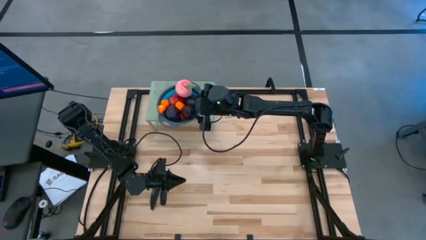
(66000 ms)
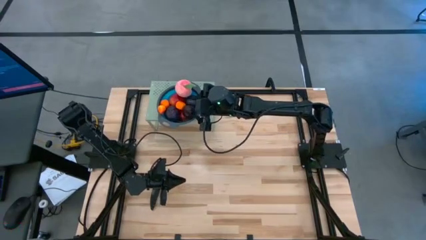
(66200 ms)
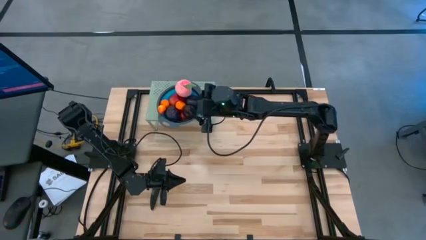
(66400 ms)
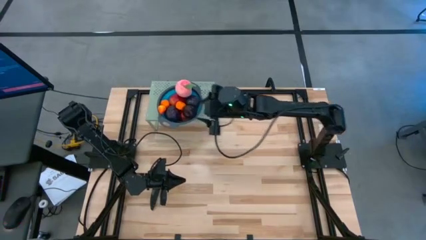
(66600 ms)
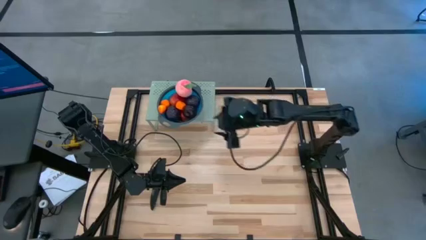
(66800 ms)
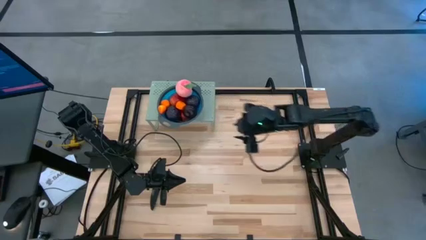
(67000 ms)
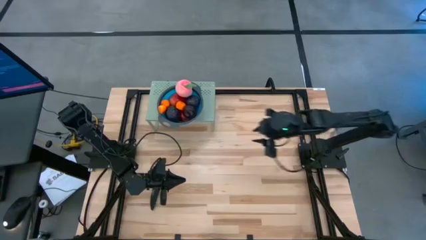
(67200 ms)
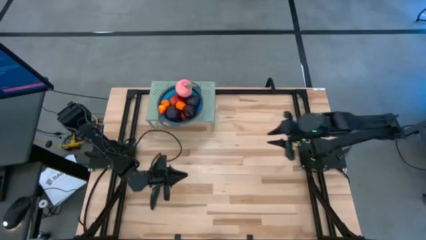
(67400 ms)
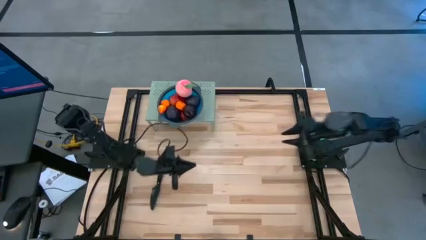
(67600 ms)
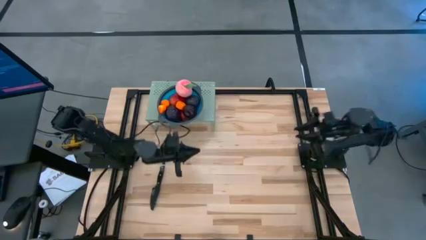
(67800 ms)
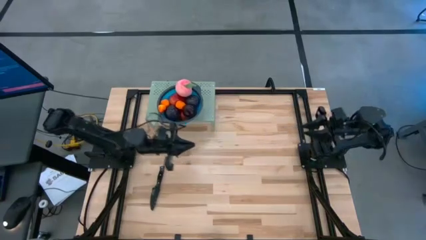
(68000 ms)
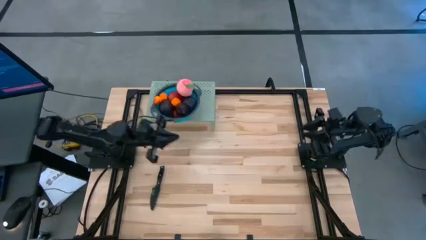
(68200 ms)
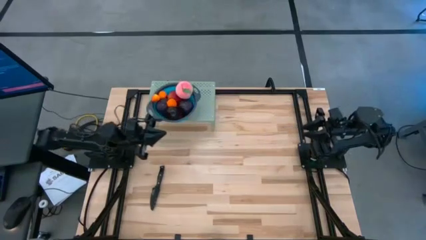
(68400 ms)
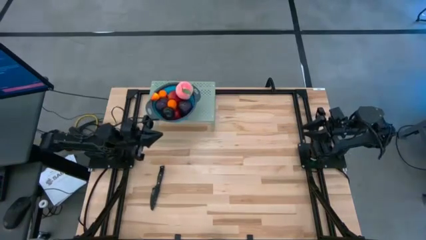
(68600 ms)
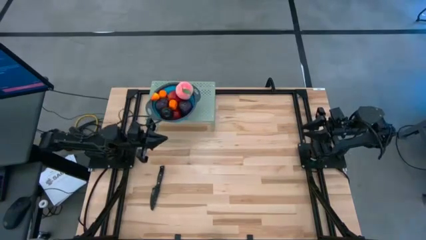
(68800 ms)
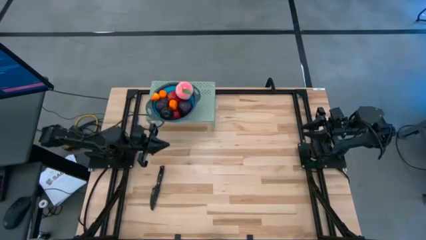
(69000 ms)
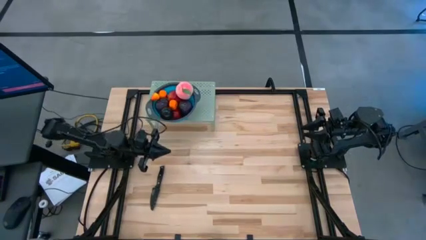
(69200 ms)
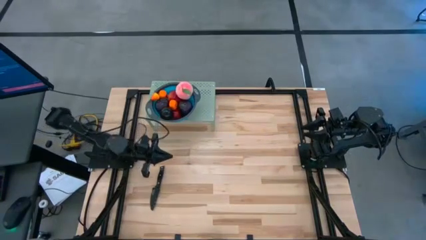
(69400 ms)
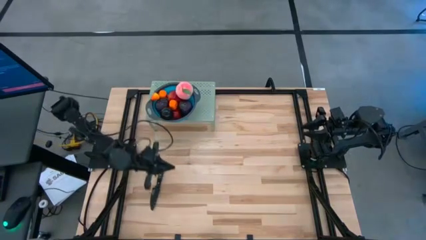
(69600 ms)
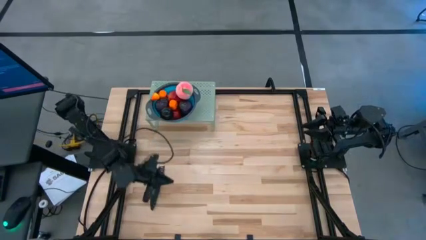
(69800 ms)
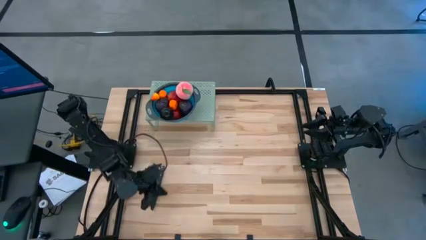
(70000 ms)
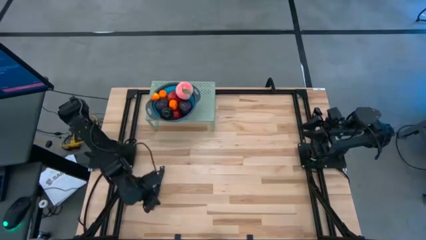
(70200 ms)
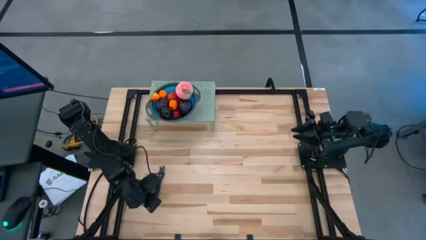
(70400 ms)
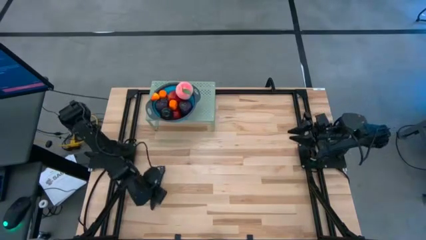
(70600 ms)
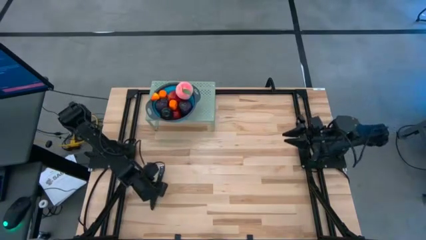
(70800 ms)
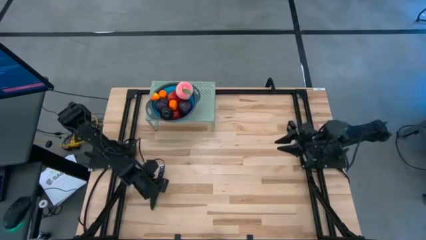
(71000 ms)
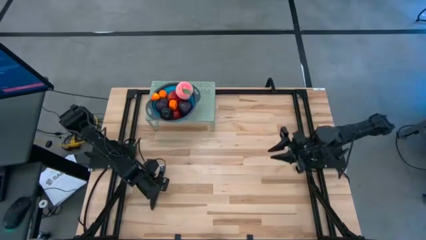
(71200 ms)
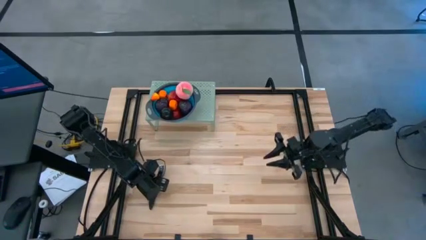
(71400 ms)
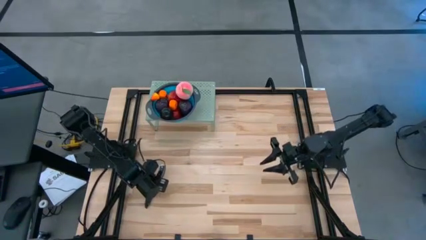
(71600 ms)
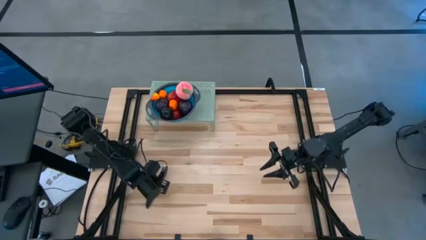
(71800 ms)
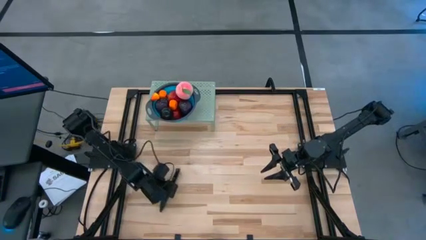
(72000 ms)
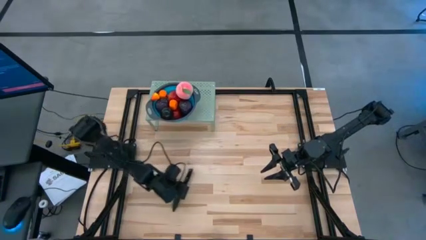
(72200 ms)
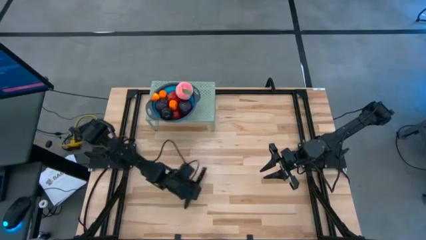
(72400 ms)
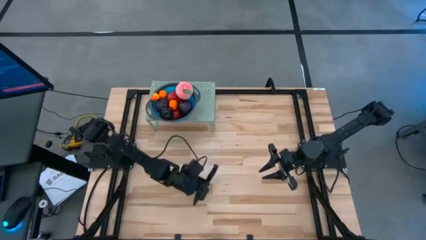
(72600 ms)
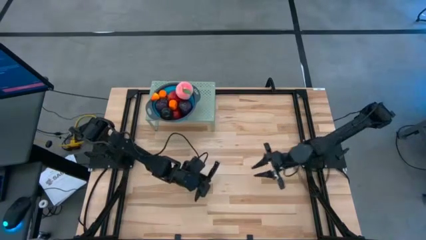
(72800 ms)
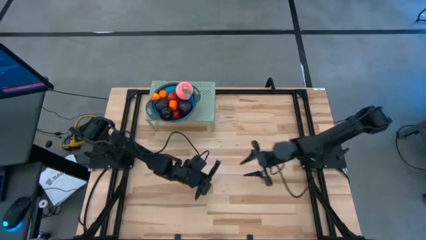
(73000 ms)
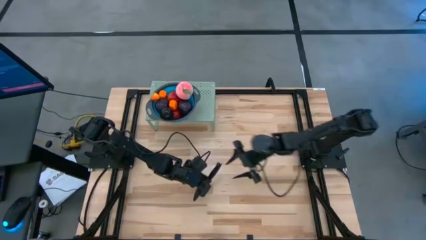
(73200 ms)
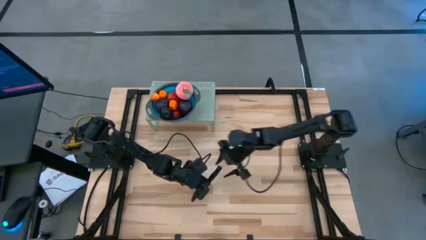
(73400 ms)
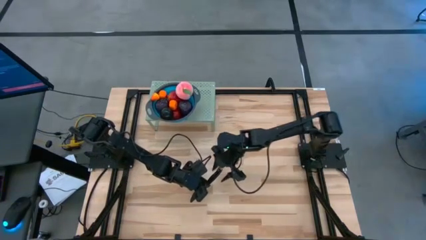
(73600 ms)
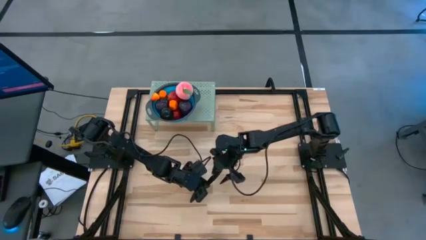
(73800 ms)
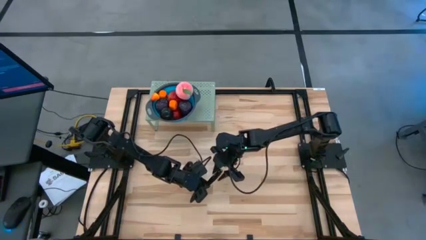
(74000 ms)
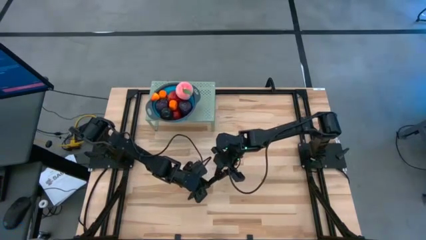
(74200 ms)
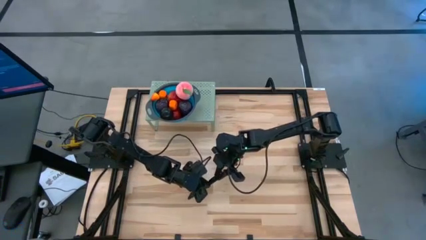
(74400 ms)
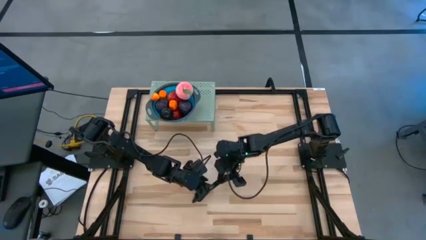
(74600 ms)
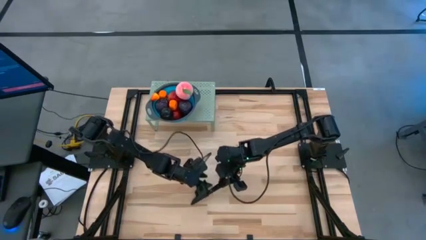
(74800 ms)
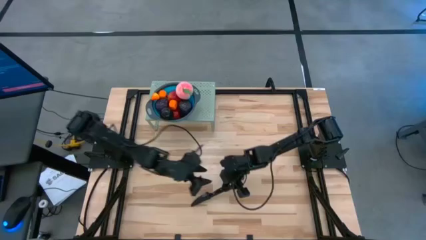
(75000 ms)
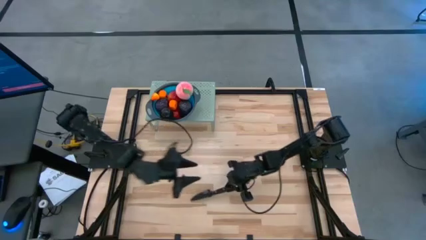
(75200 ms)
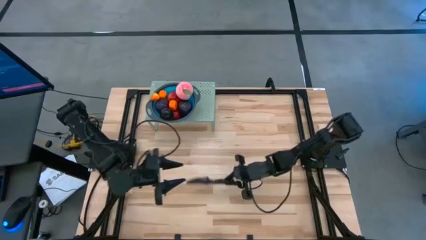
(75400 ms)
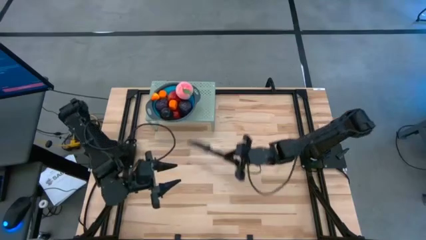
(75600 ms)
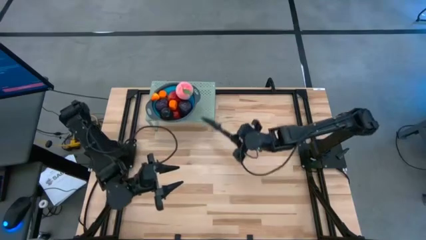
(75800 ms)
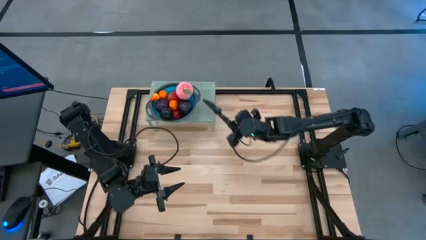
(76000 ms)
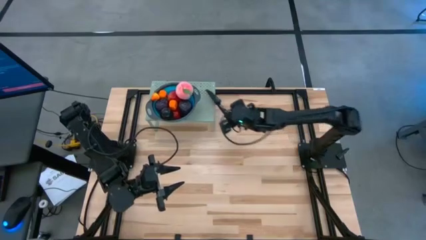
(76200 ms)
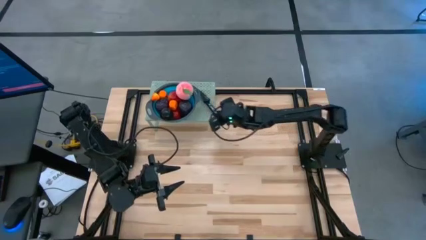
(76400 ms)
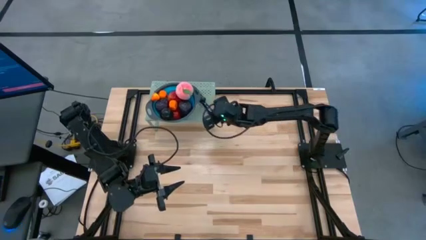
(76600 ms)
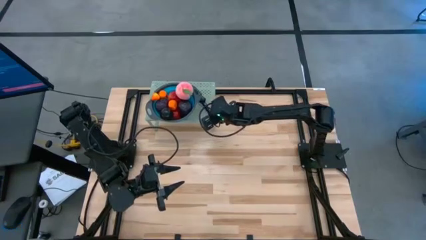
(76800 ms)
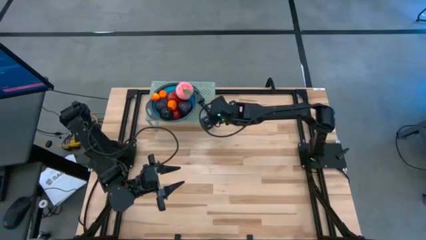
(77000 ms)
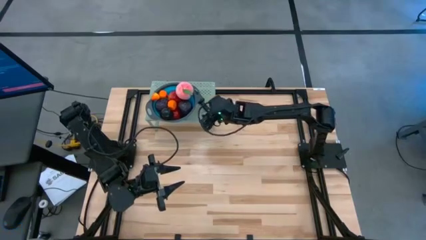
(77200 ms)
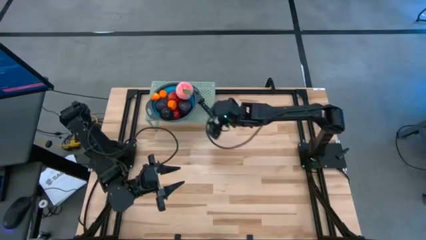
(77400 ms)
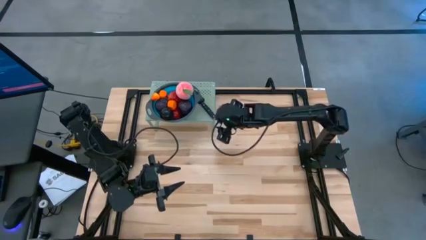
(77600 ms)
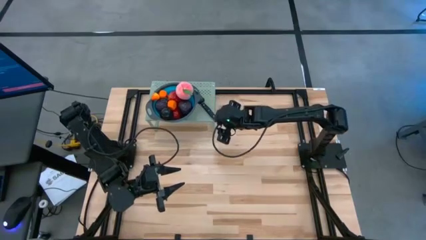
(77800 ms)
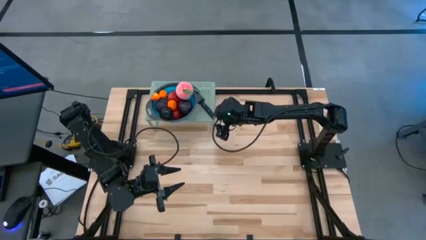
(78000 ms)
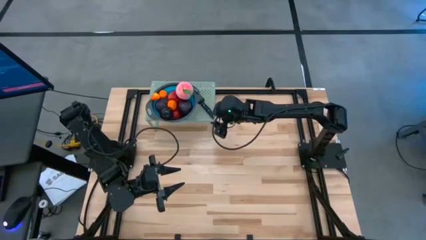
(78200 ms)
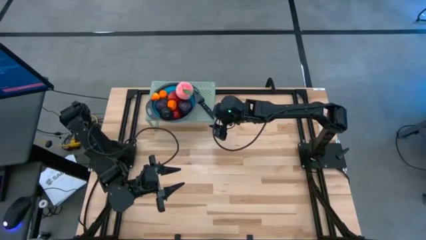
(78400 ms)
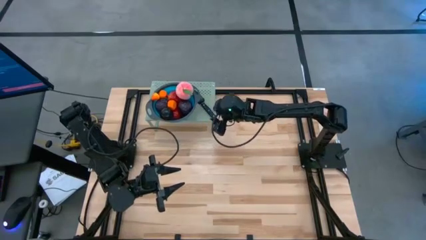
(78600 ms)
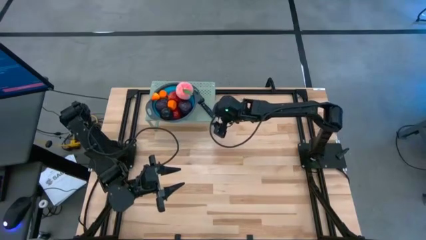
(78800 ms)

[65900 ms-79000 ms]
Task: Pick & Place Fruit
Put the black knife on the shelf

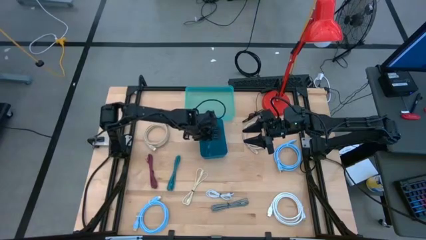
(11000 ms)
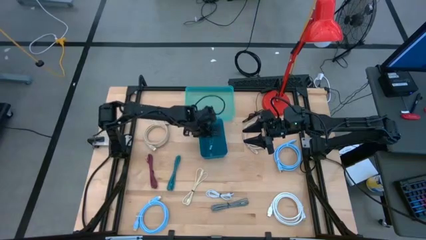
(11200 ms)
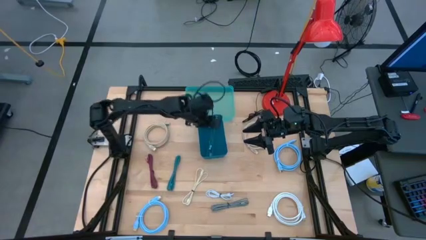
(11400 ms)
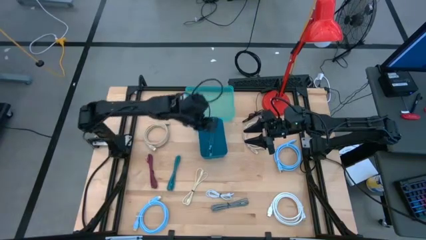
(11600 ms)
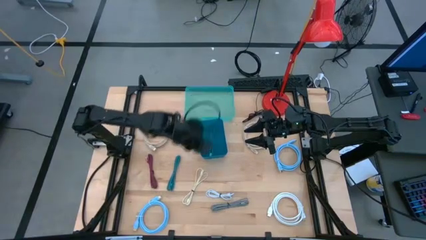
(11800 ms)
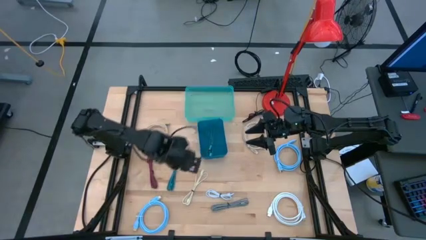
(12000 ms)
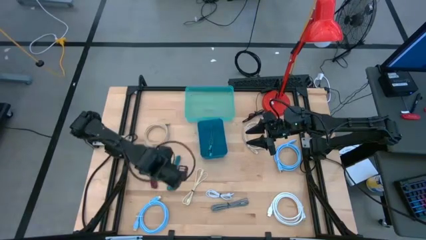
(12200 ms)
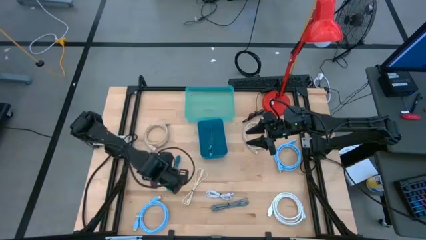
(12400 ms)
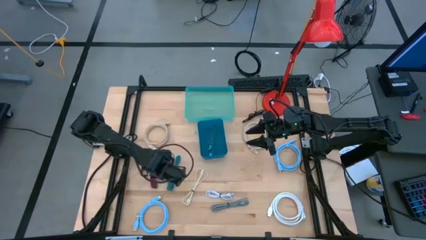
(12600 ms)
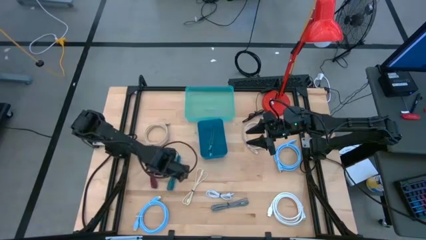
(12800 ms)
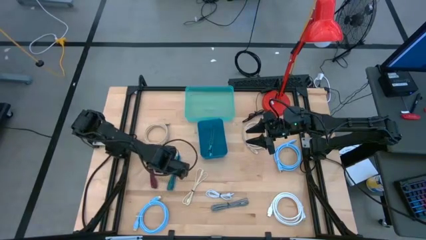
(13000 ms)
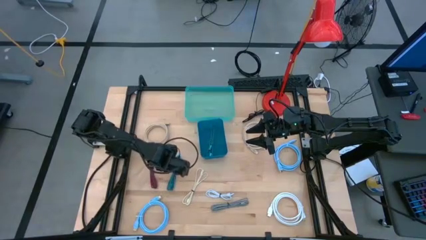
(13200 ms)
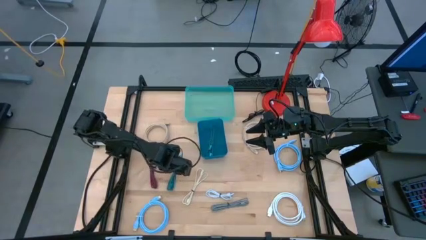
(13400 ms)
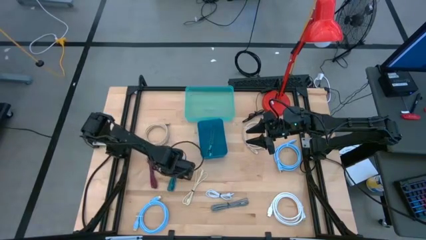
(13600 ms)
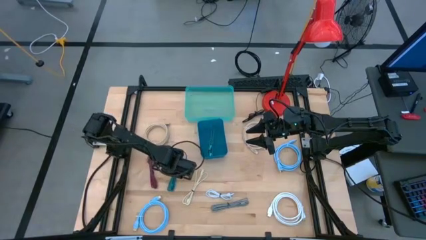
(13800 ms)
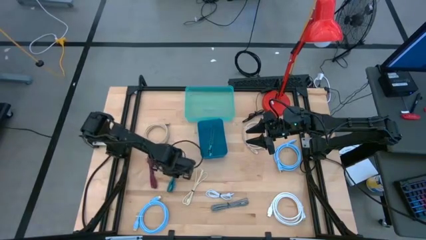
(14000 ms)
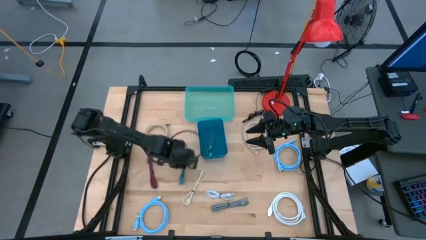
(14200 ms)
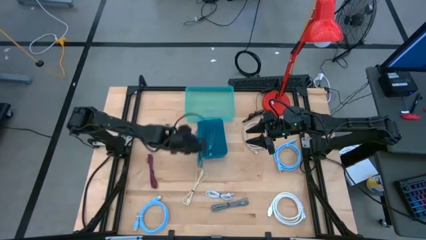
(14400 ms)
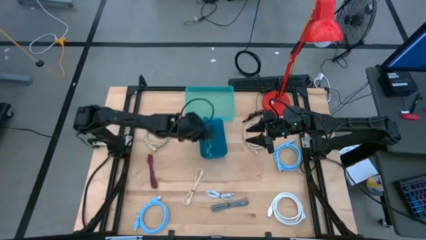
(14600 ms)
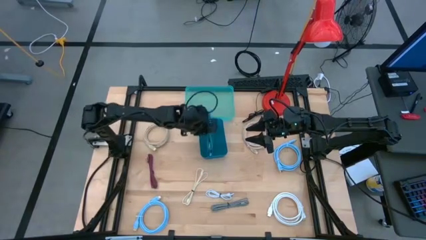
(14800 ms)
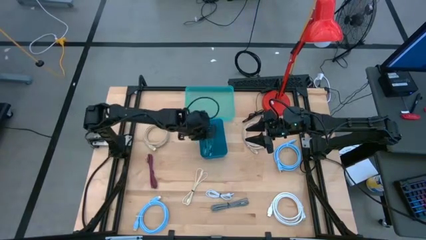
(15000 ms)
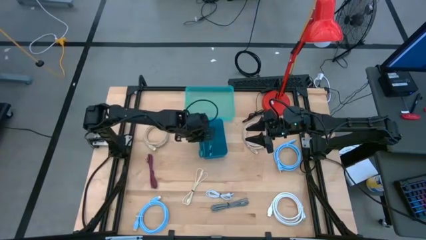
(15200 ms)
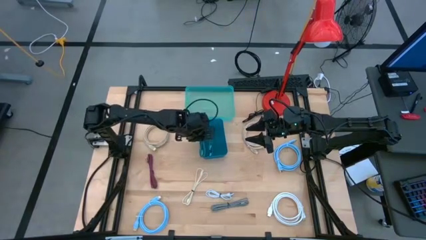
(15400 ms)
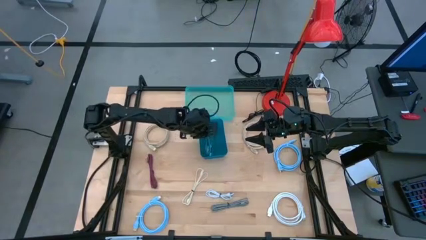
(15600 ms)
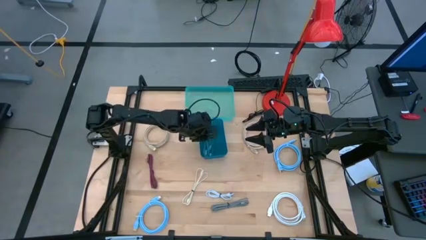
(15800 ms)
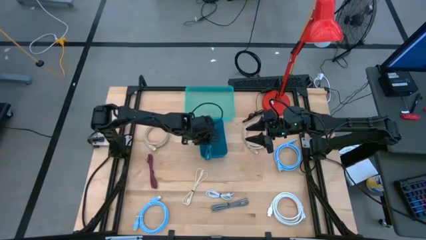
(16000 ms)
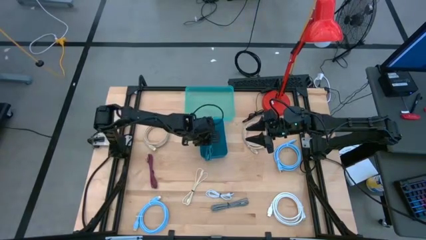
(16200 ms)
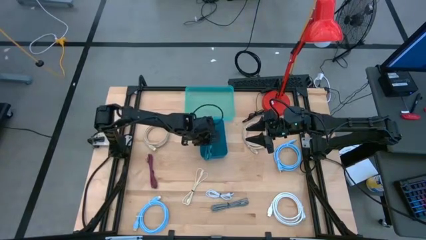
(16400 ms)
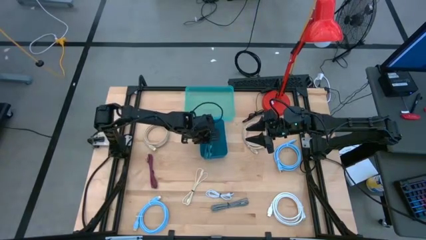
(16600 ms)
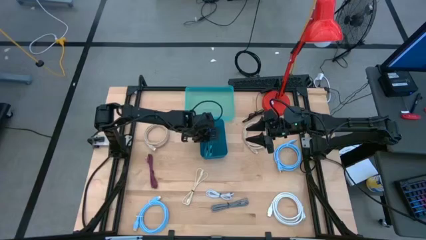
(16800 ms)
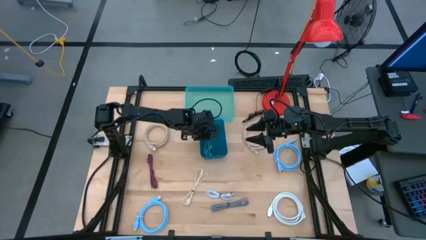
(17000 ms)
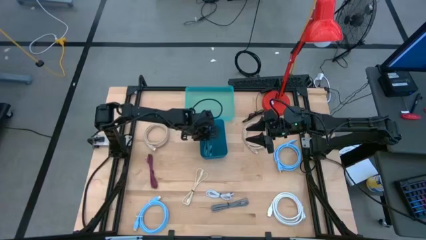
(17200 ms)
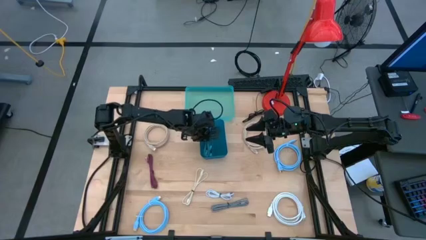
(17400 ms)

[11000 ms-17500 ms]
Task: Pick & Place USB Port
Put the blue usb cable into the blue bin
